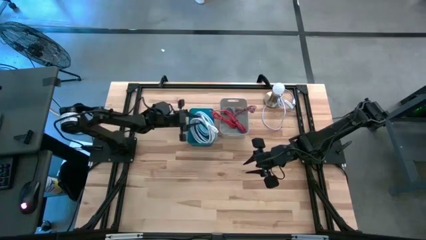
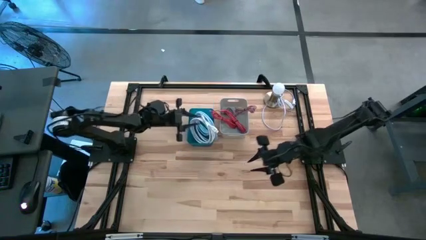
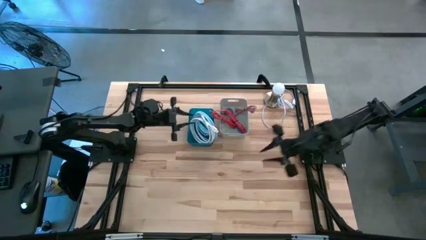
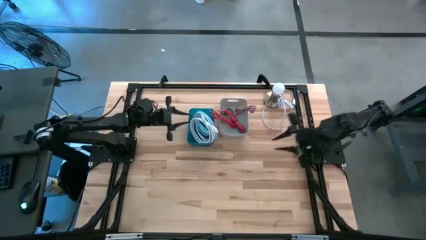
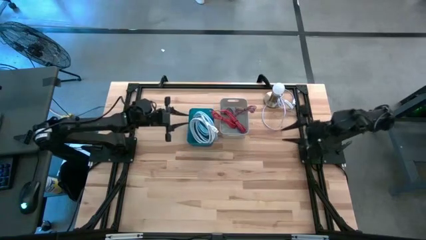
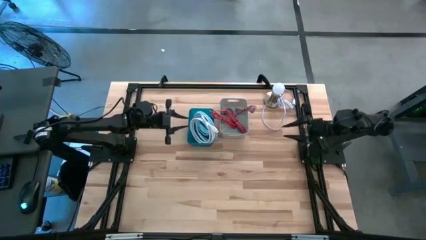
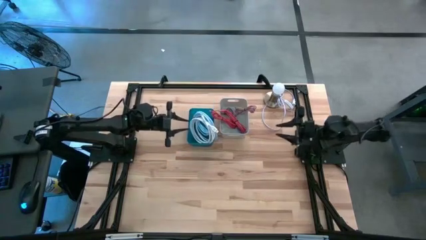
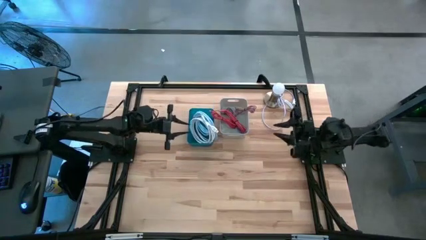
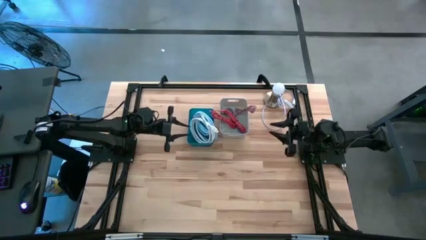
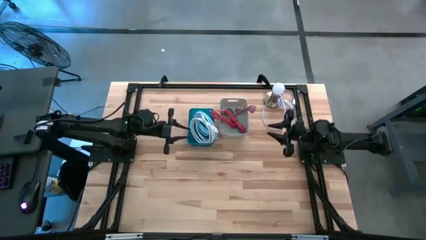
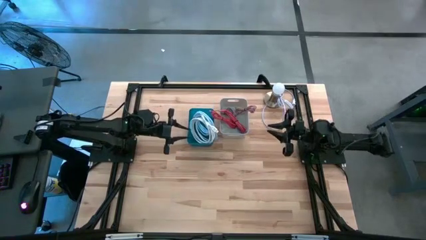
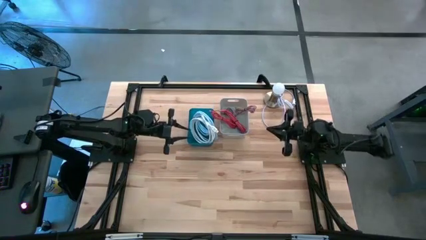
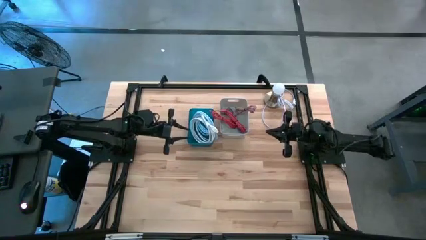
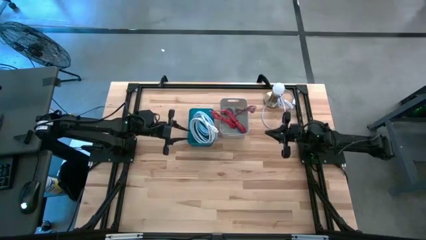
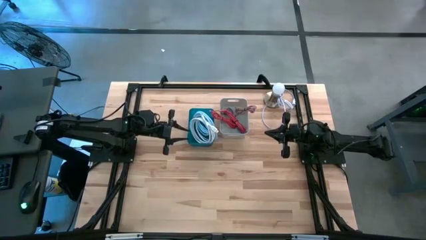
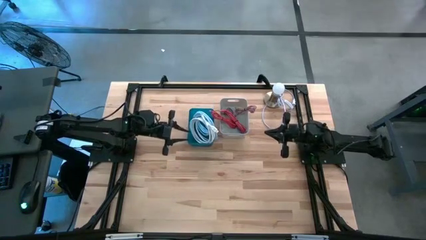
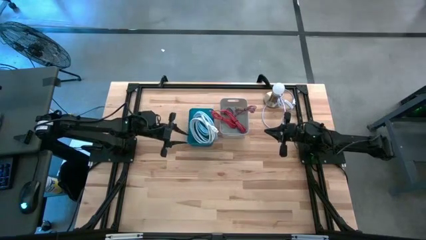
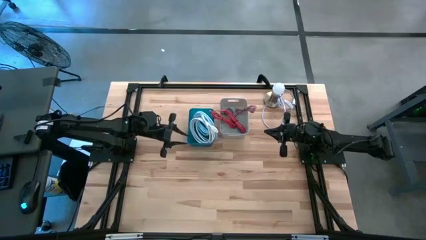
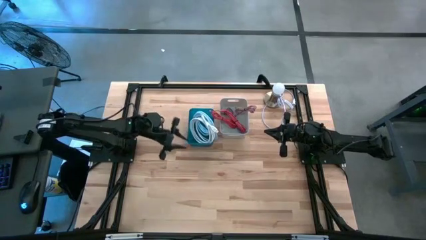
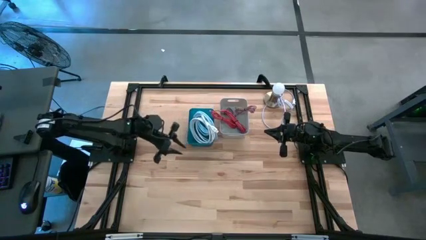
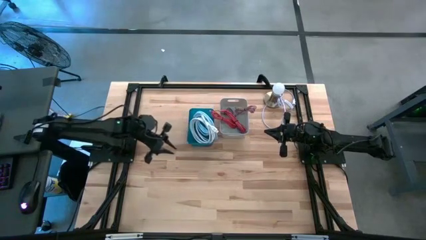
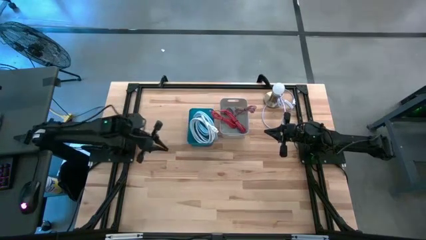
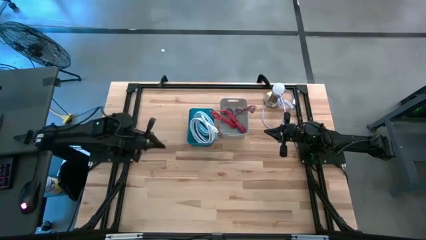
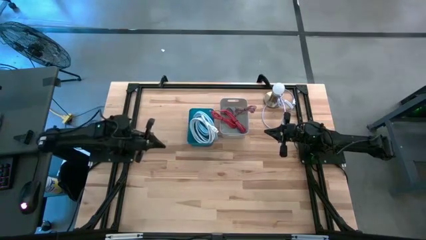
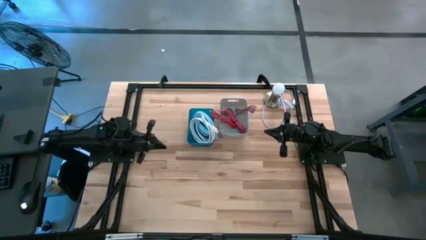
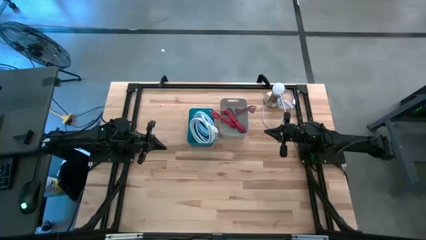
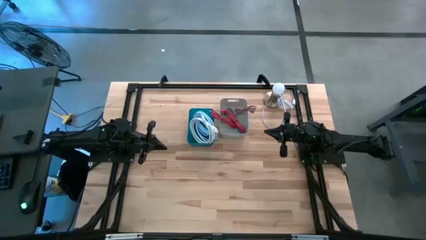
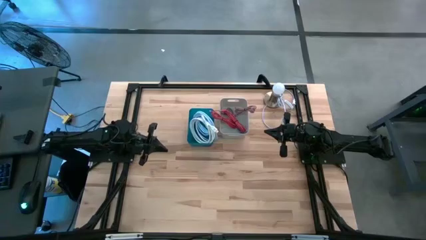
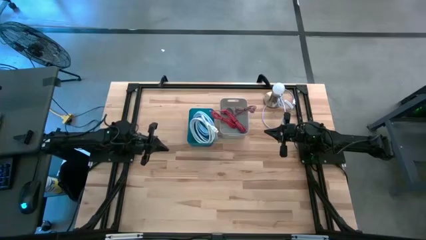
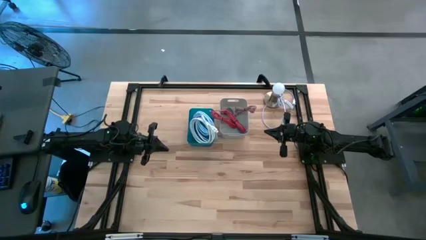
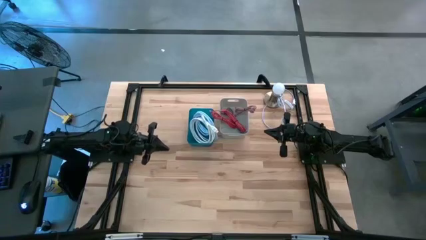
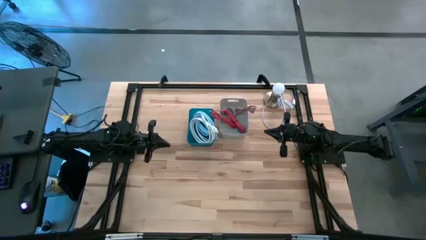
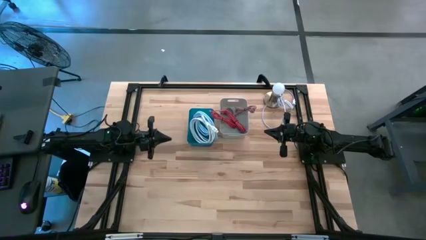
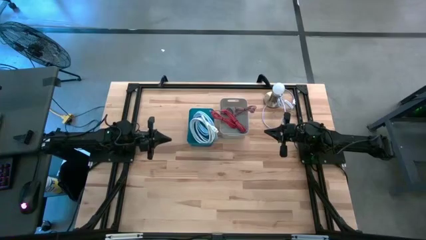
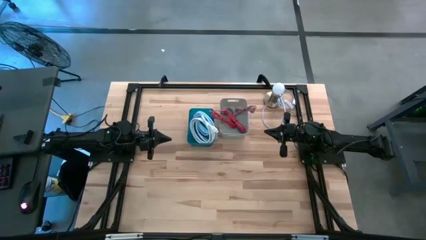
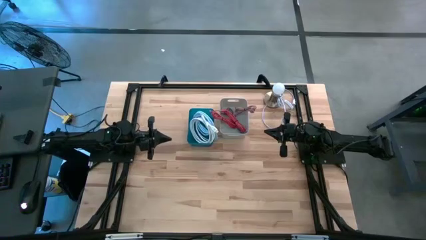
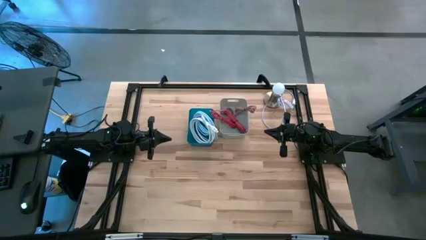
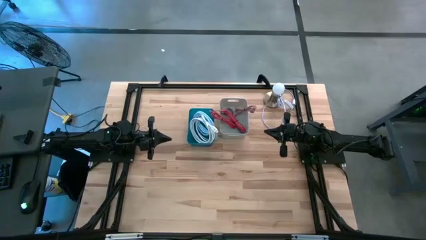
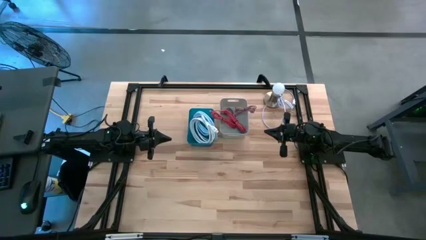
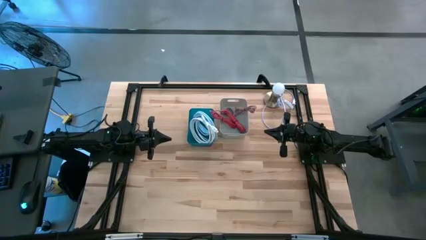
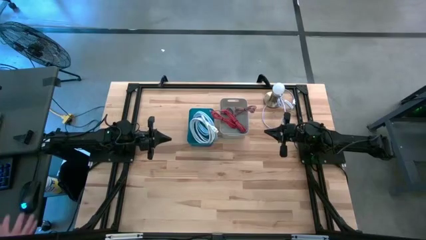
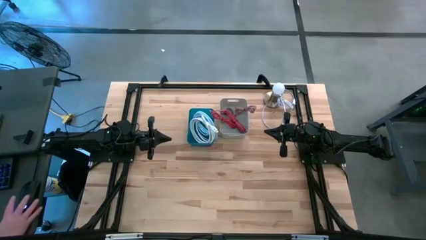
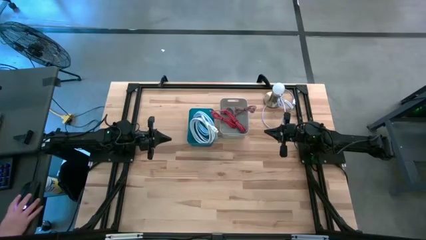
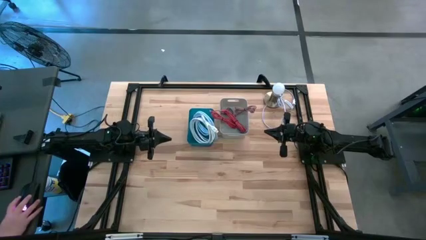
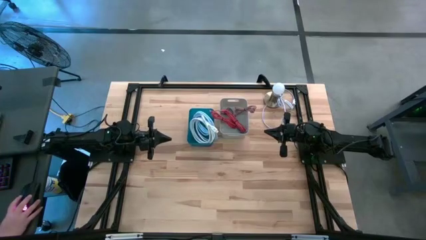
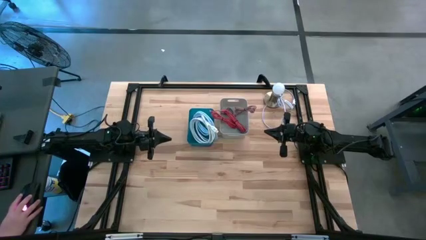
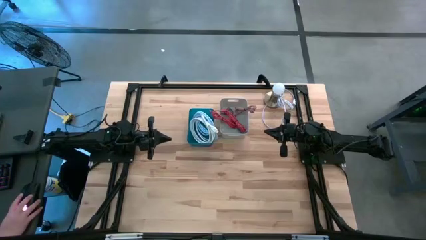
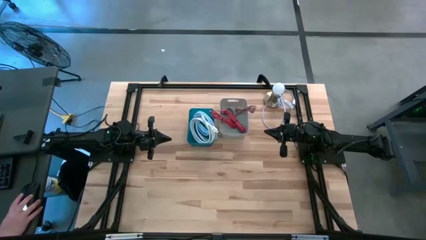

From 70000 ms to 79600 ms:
Task: Pick & Place USB Port
Return to Home Position
